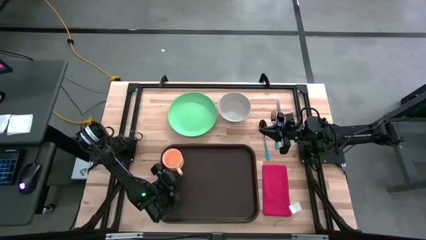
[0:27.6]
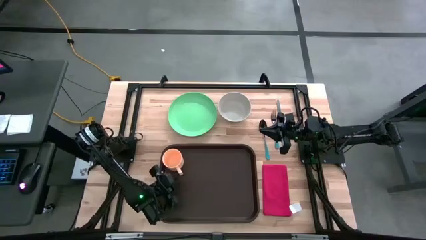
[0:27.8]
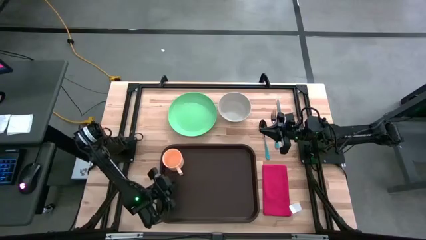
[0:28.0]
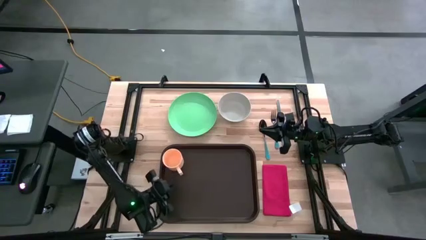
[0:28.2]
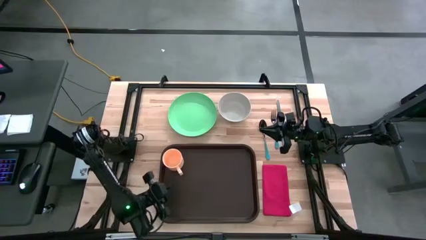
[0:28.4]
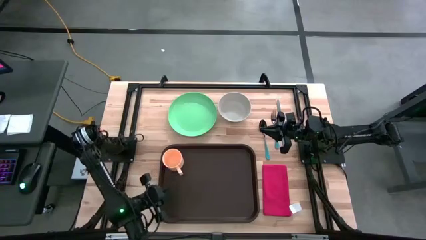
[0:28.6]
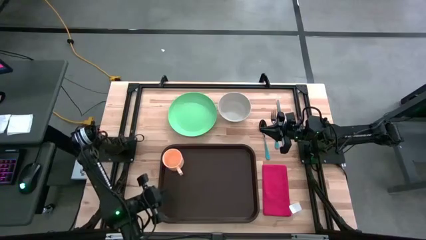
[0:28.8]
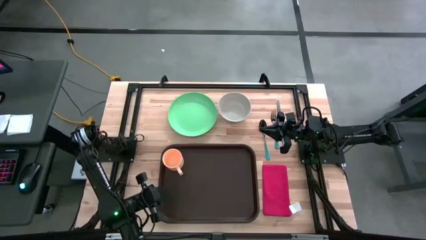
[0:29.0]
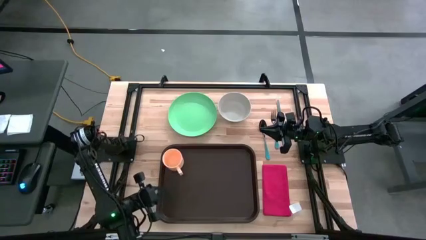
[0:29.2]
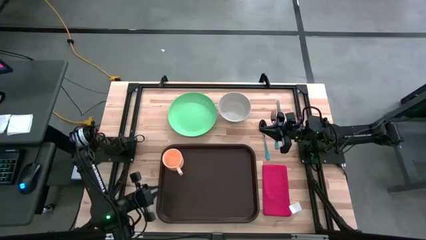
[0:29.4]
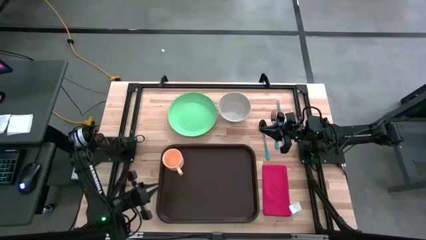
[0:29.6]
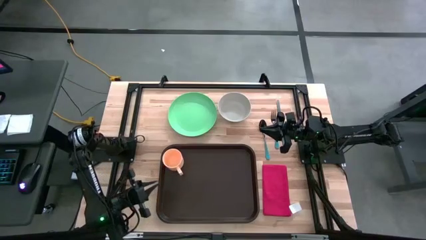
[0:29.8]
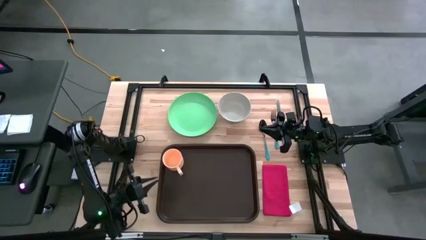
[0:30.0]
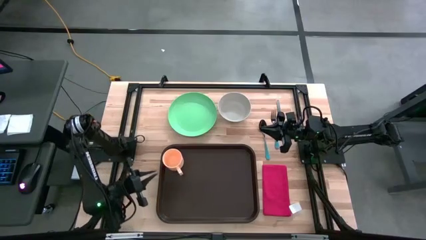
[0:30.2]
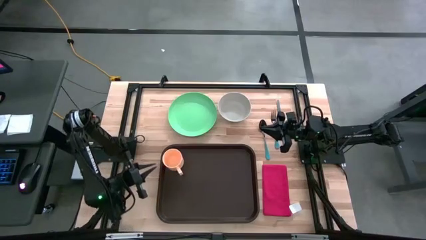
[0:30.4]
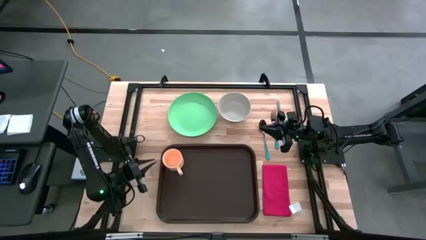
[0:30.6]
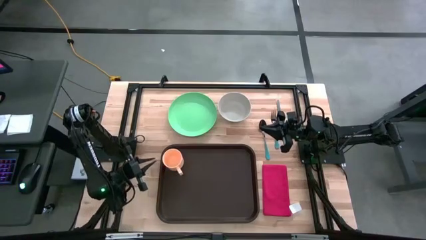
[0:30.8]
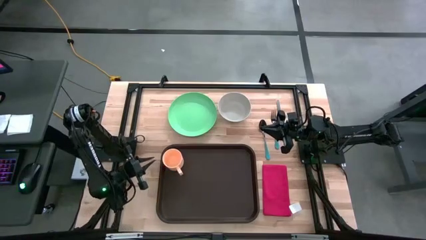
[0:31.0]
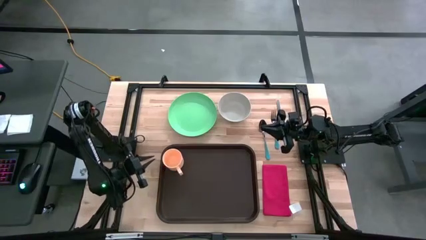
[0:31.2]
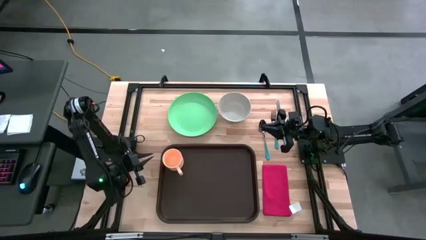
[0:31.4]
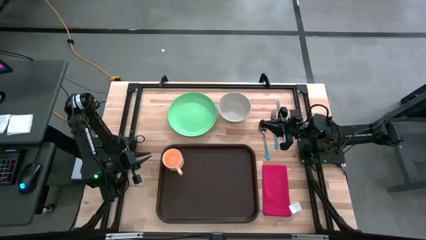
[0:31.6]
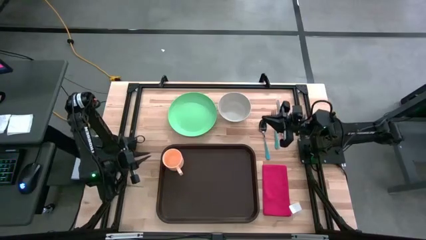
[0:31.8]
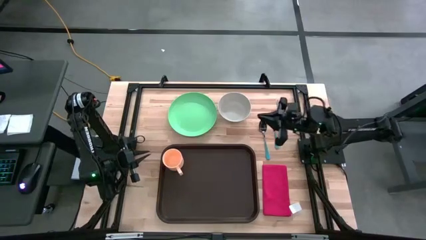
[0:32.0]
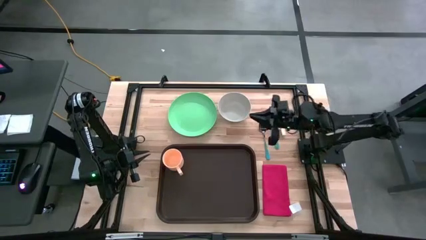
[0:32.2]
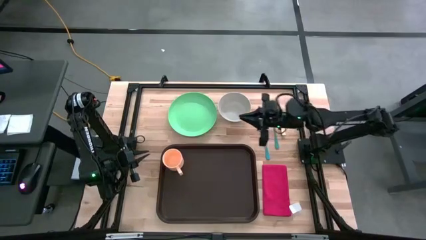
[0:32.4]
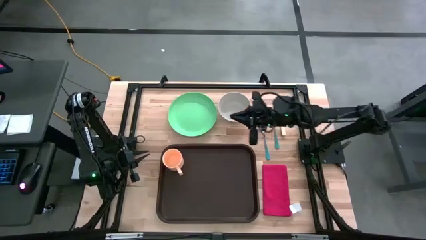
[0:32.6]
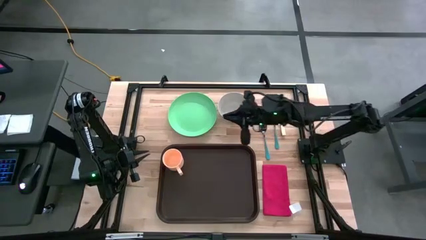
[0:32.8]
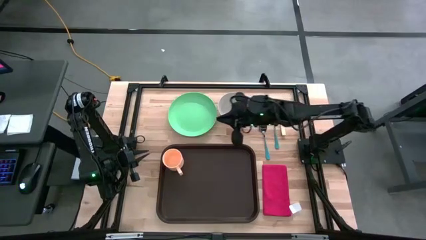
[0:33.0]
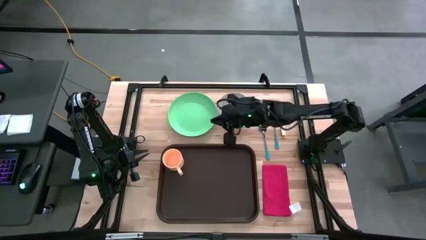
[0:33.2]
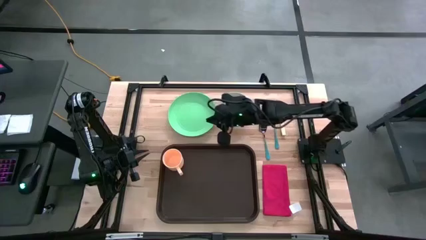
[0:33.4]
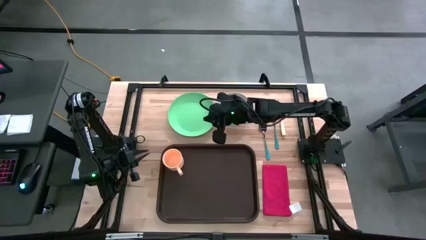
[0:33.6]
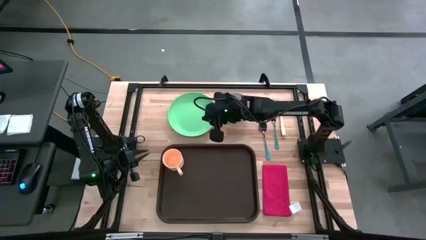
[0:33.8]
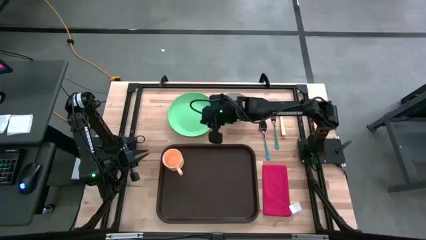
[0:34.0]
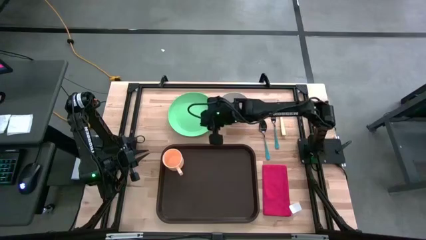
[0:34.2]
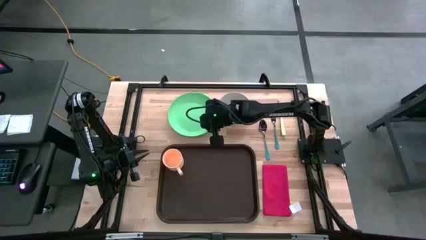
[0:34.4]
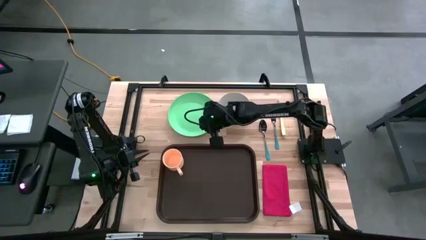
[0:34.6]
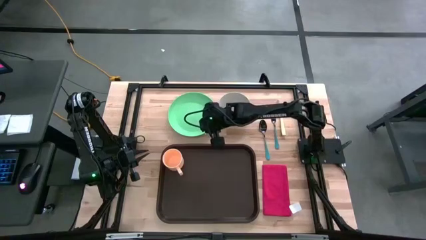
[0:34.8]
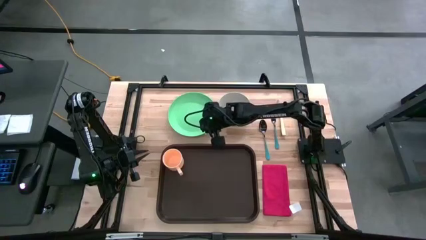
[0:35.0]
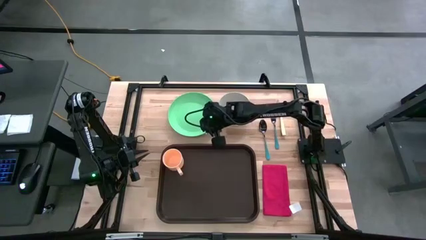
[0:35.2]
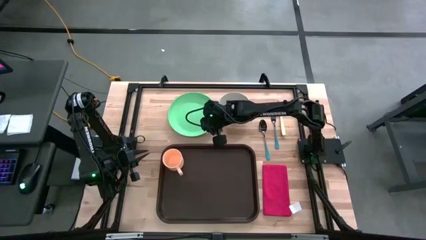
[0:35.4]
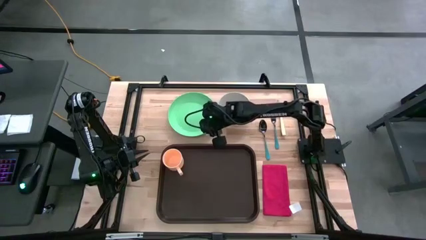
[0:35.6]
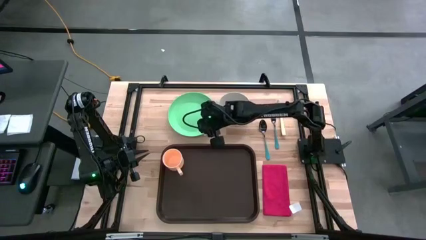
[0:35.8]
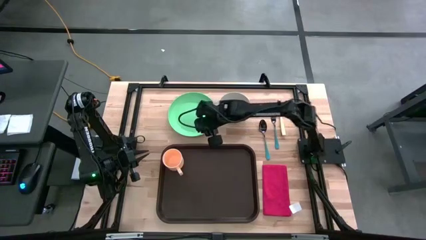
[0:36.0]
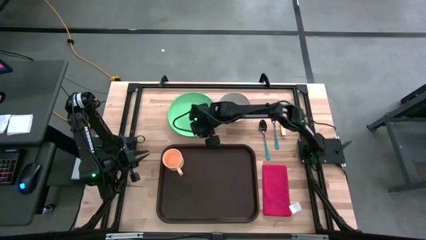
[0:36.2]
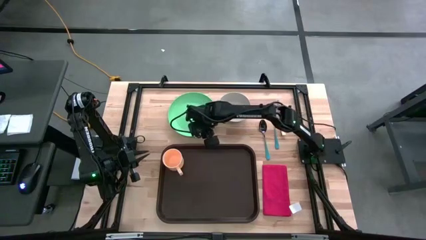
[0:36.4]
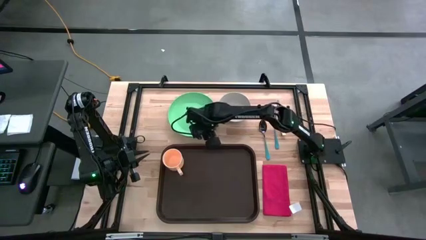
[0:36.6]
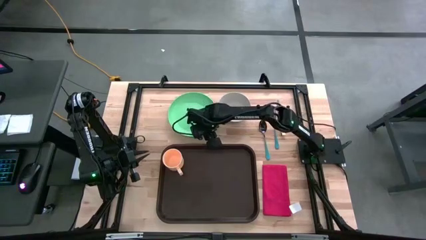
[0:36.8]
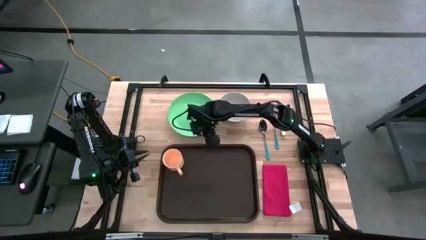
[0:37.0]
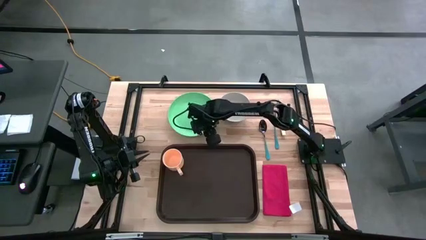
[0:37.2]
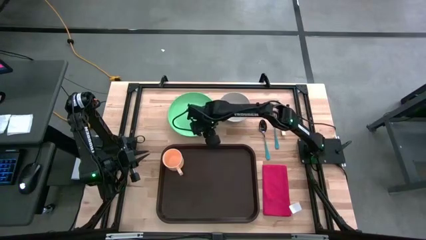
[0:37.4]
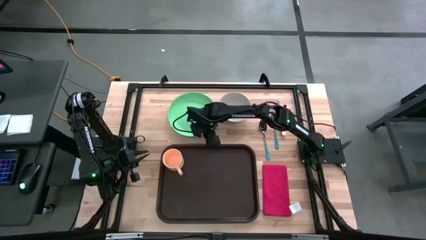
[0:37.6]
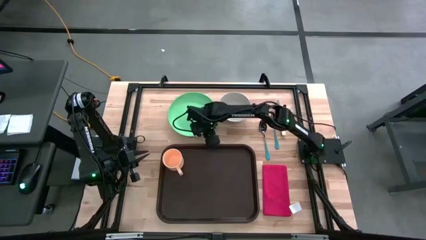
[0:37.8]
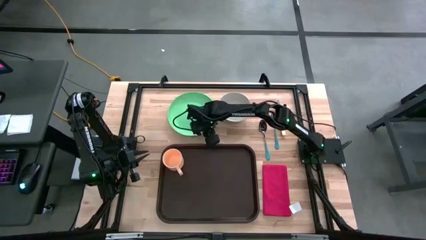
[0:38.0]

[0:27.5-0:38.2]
Task: Set up tray
Put the green plate on the black serving tray to the bottom right of the orange mug

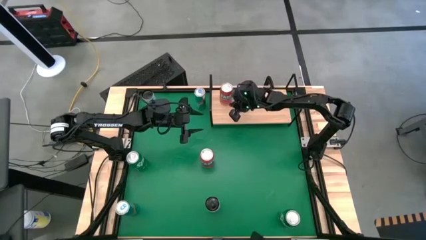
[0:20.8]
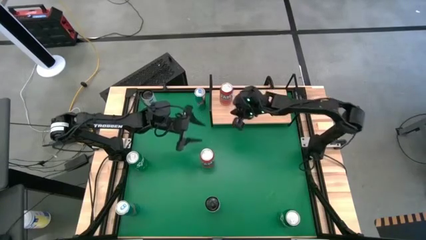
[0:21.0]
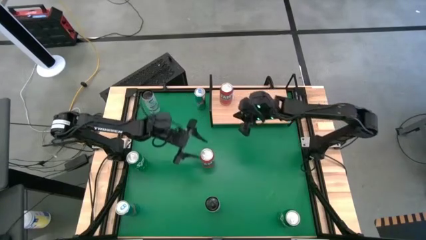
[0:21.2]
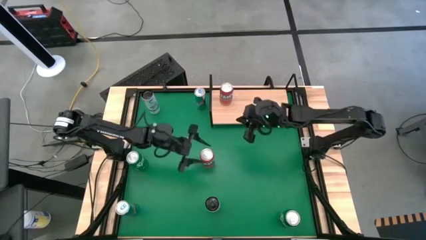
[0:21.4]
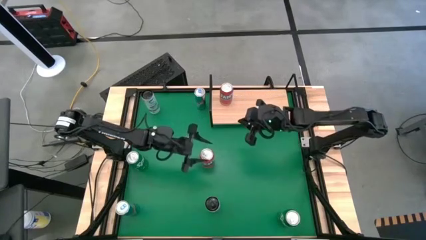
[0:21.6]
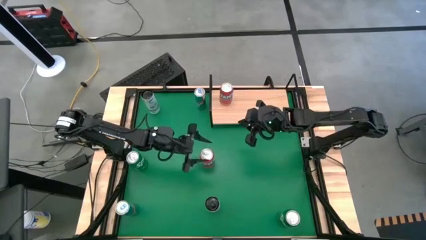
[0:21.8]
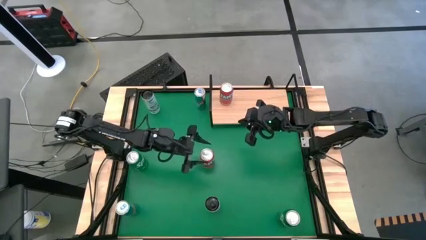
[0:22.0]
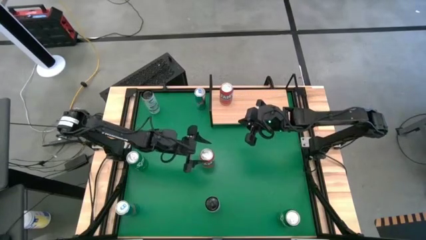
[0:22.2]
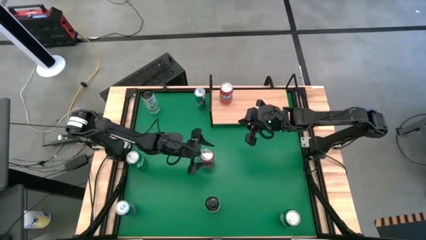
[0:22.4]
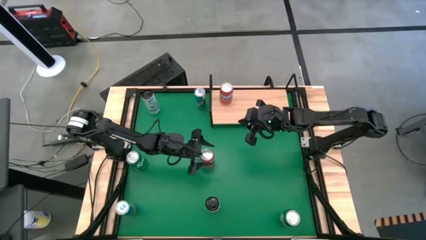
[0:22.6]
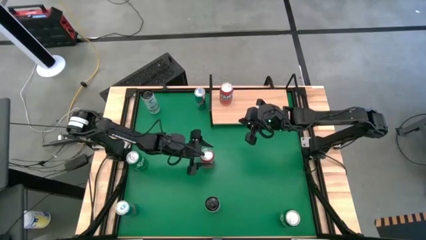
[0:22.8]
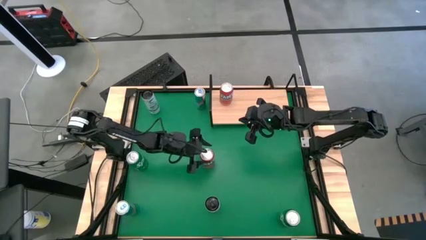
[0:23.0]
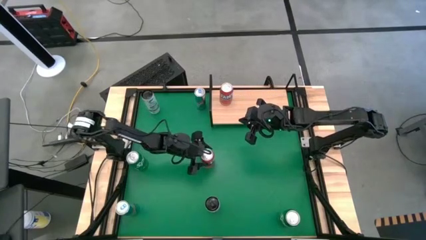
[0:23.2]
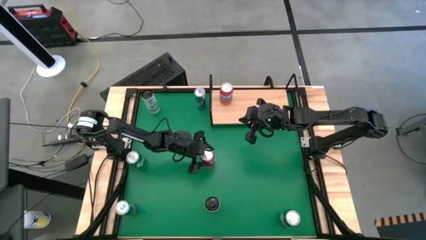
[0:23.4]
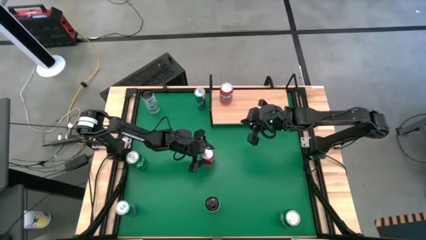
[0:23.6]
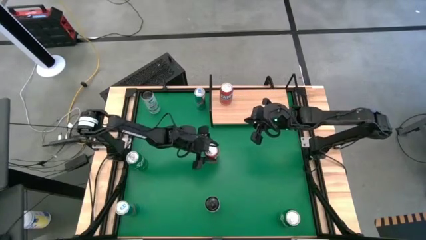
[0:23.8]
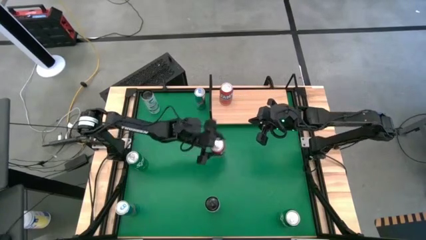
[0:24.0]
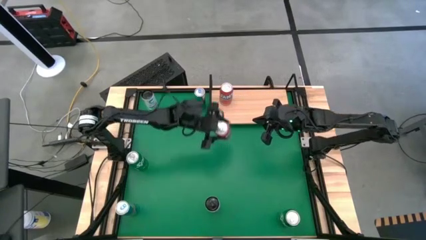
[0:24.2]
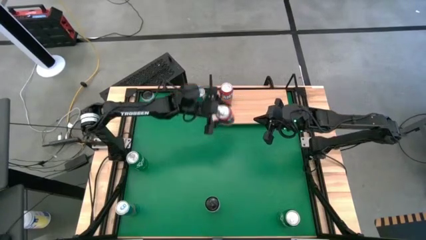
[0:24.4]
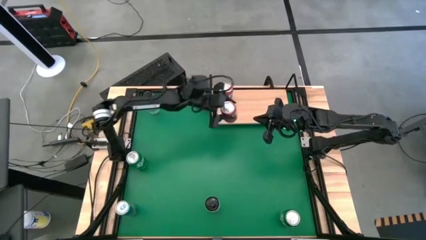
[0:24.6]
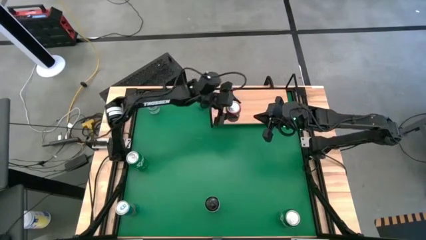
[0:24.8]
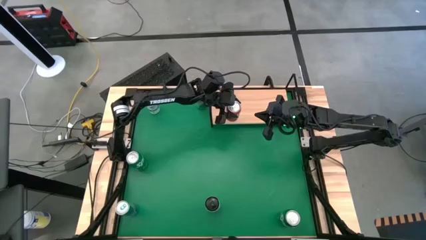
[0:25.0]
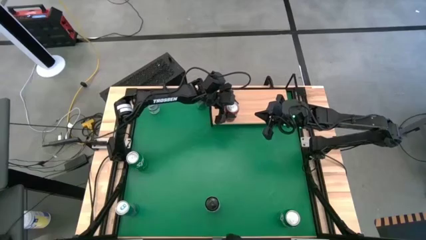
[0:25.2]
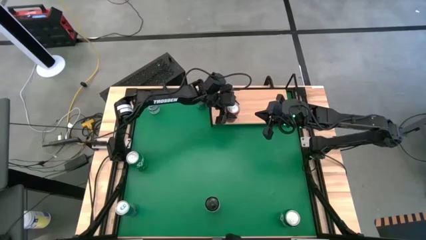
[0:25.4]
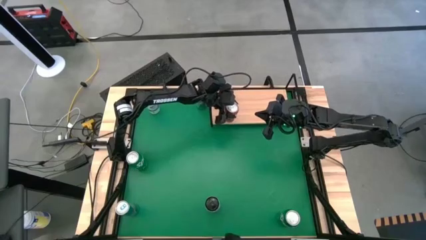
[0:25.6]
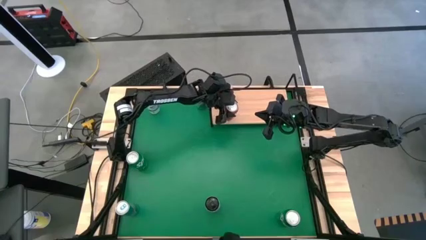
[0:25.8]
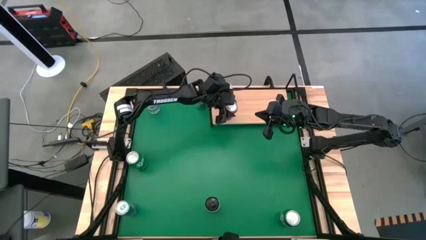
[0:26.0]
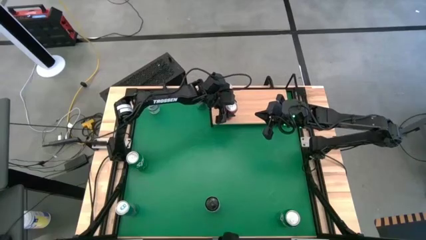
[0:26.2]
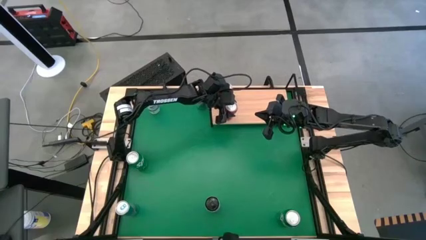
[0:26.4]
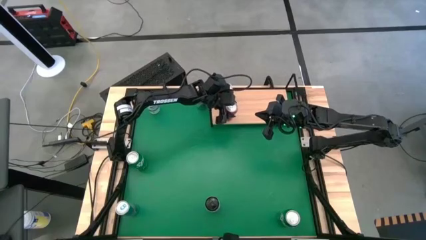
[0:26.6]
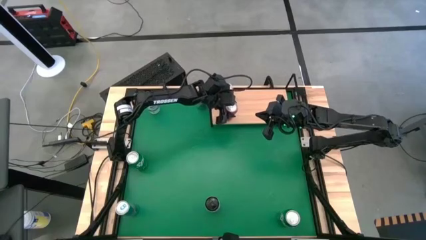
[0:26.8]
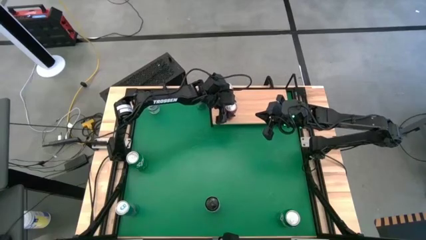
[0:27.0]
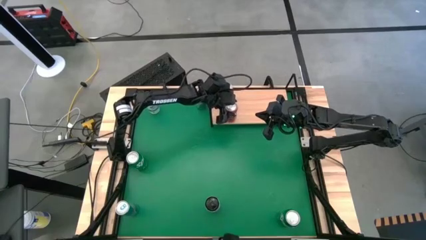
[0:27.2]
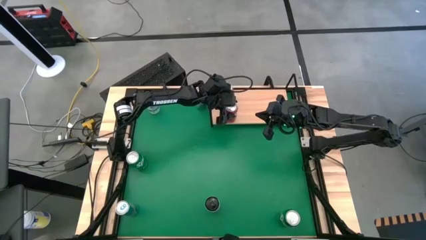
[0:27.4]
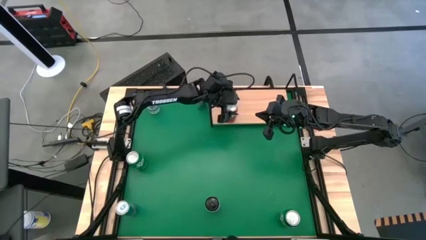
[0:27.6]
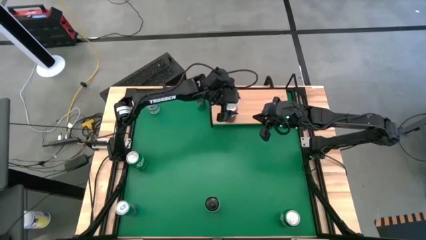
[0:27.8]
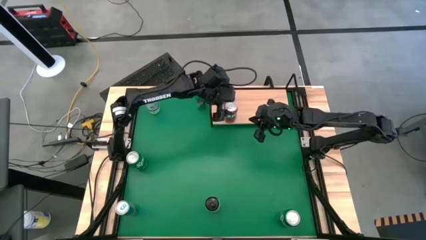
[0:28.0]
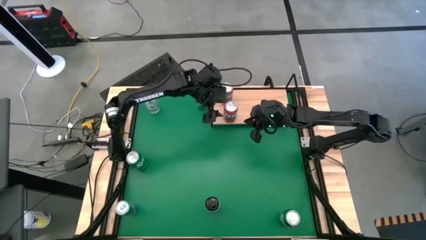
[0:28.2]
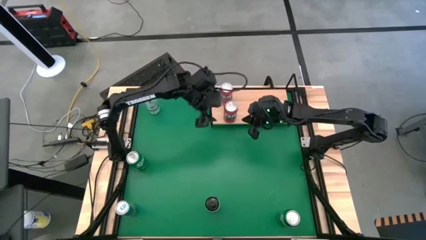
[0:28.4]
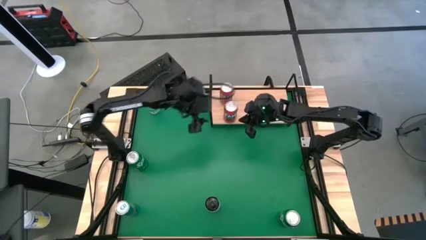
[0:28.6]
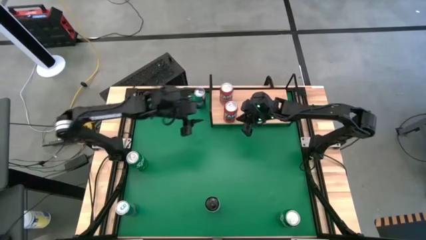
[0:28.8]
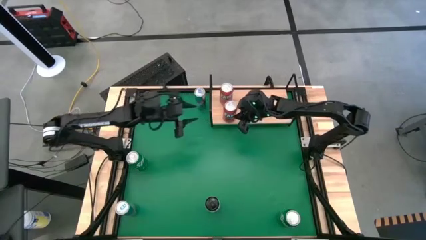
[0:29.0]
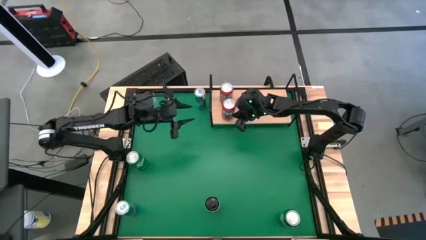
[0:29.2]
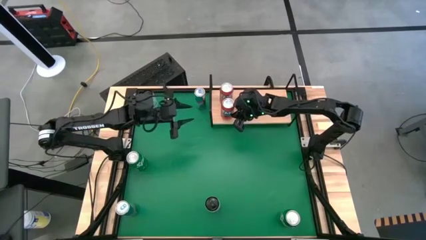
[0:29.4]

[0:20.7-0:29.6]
Task: Place canned beverage on shelf
Put the red soda can on the shelf aligned with the other red soda can
